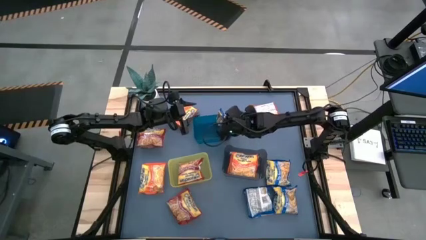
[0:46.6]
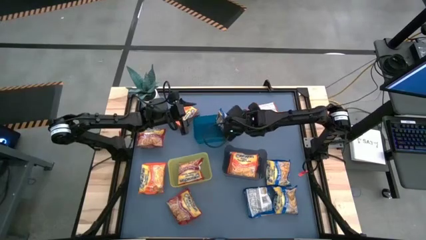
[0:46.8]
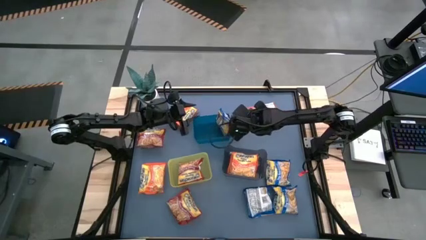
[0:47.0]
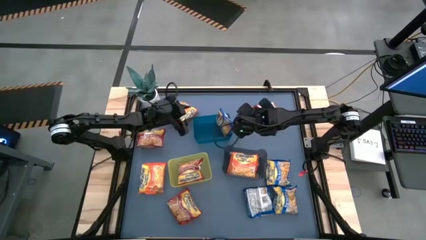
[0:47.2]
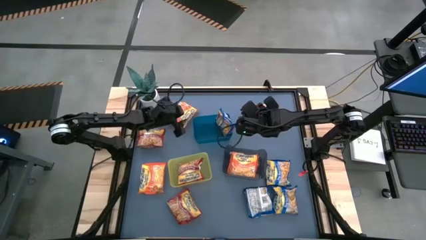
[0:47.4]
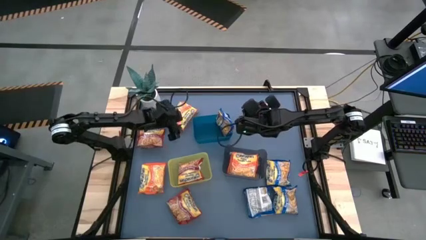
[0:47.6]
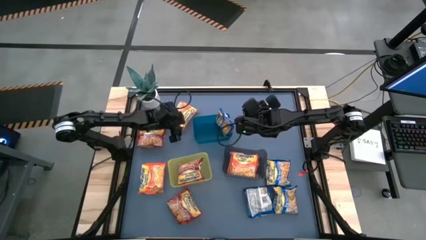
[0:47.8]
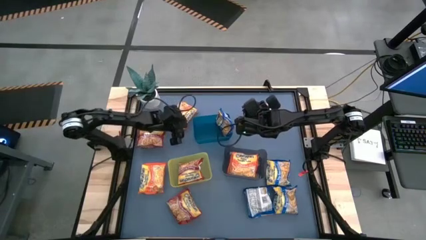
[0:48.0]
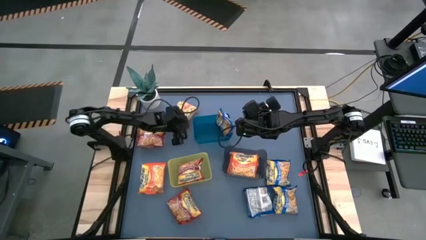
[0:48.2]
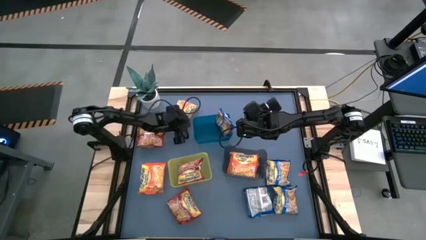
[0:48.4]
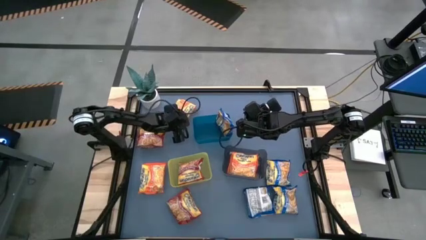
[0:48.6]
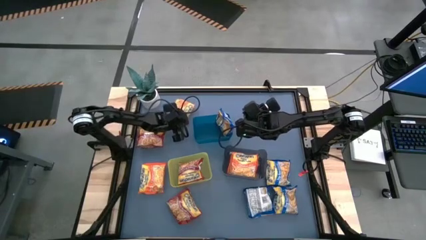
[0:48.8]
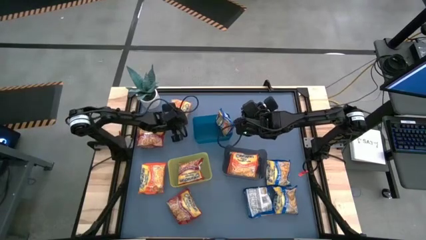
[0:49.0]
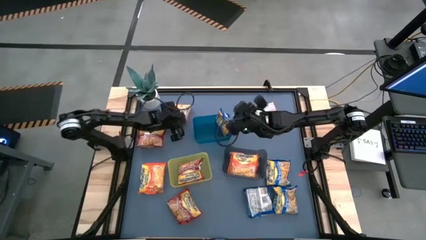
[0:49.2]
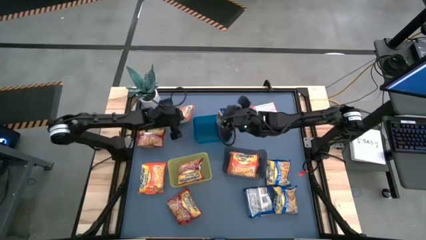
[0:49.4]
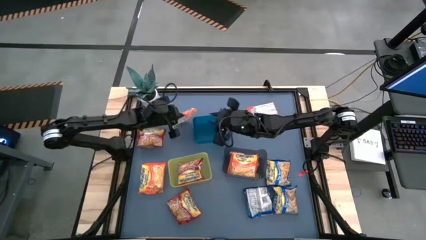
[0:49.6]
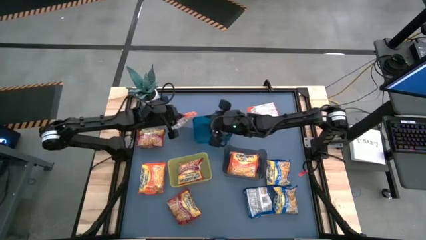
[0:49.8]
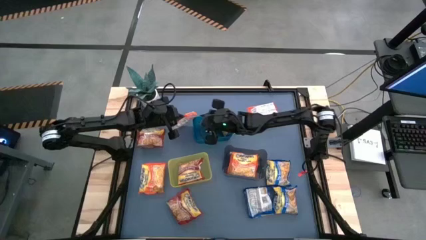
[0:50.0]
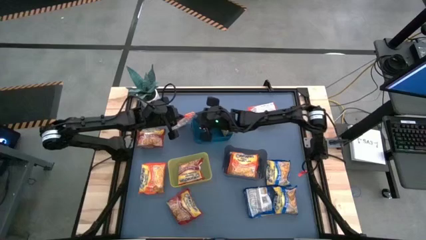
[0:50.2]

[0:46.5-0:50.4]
Task: Sort Maruchan noodles
Put the orange noodle pack into the black bin

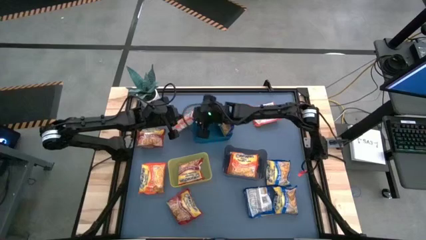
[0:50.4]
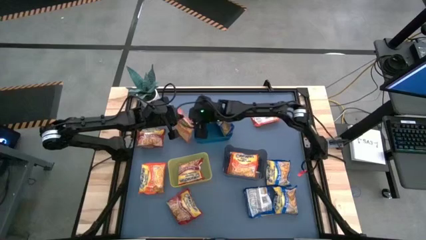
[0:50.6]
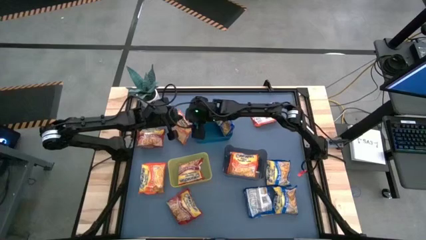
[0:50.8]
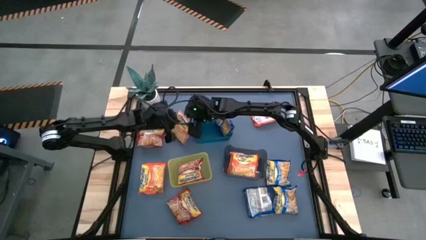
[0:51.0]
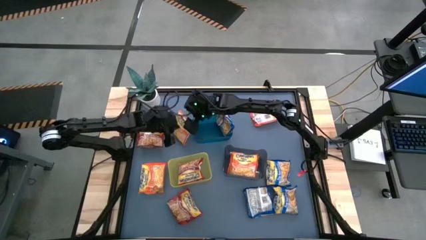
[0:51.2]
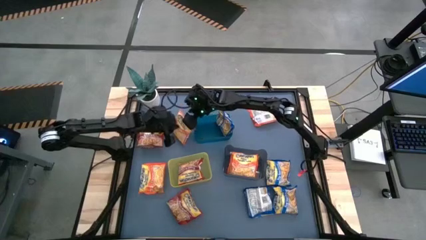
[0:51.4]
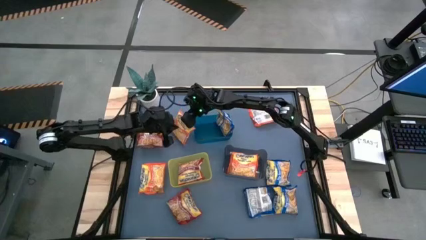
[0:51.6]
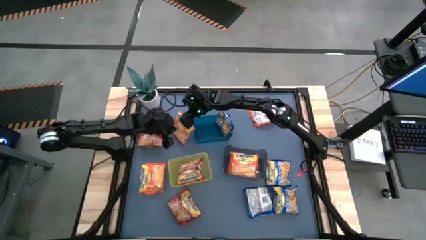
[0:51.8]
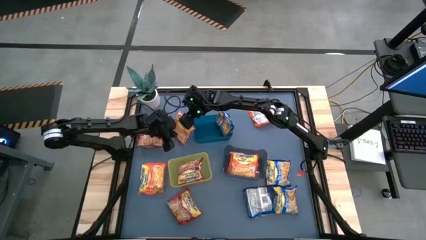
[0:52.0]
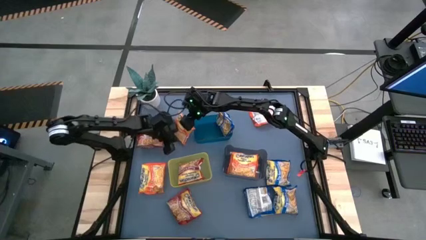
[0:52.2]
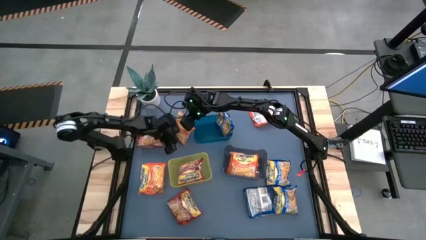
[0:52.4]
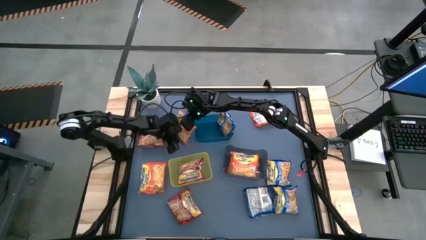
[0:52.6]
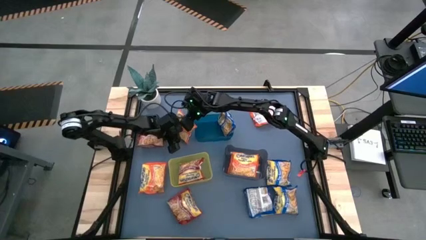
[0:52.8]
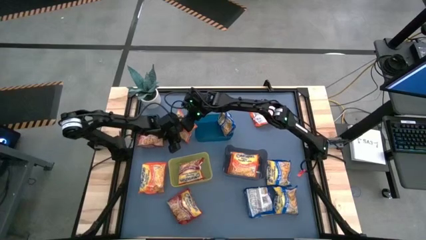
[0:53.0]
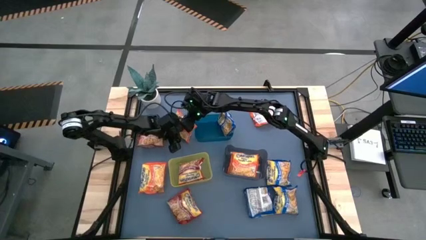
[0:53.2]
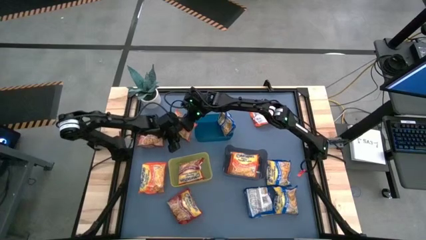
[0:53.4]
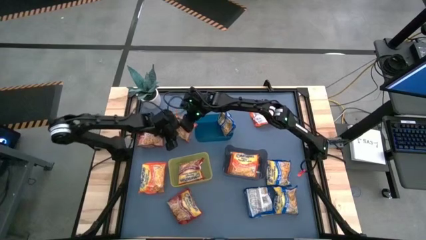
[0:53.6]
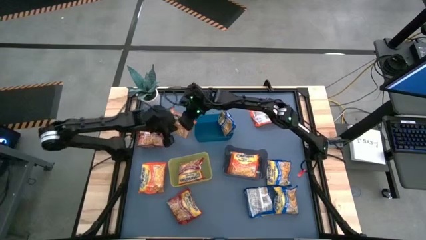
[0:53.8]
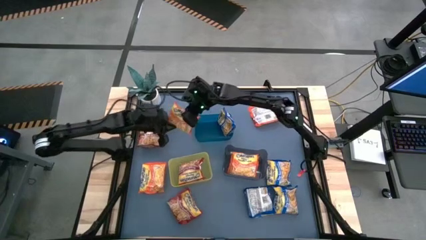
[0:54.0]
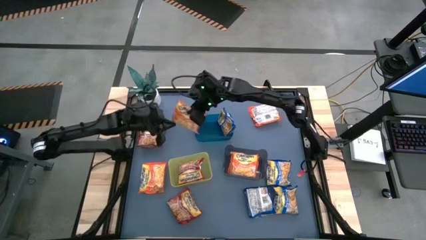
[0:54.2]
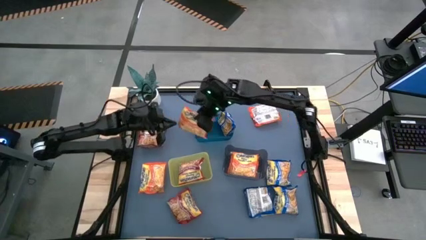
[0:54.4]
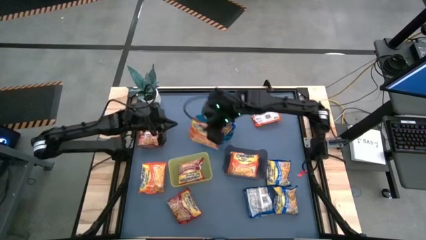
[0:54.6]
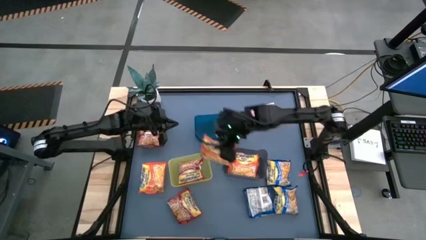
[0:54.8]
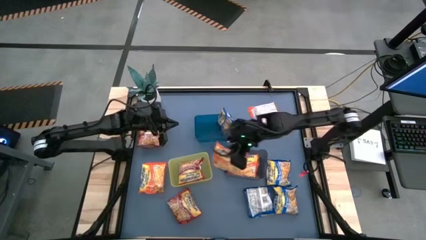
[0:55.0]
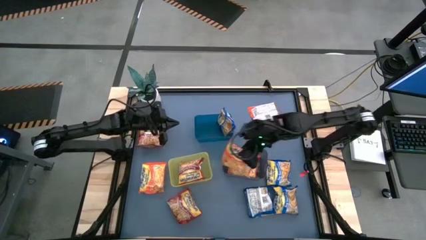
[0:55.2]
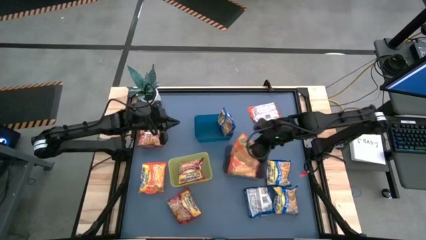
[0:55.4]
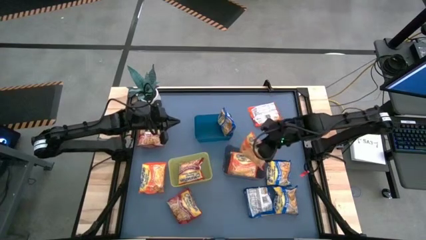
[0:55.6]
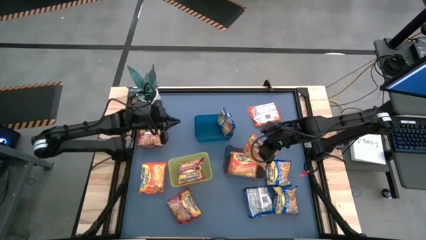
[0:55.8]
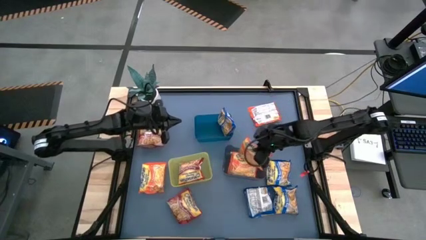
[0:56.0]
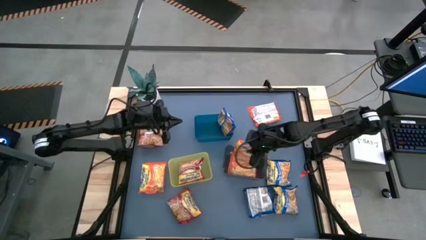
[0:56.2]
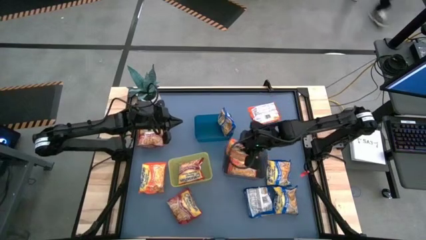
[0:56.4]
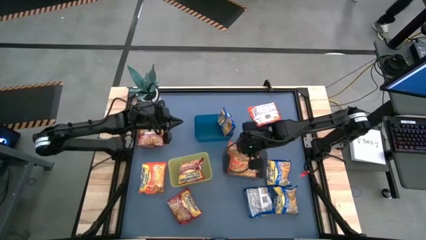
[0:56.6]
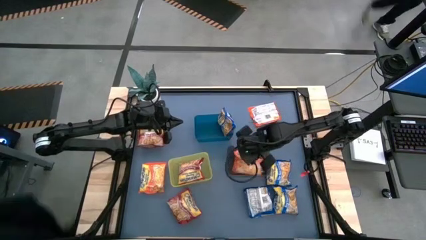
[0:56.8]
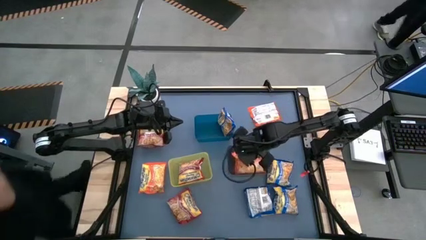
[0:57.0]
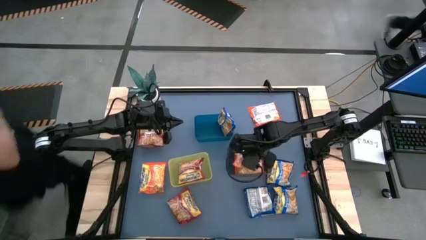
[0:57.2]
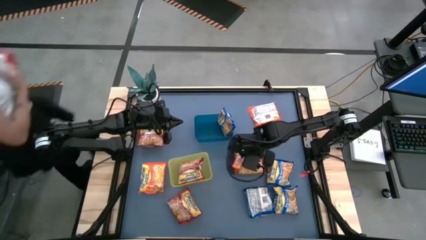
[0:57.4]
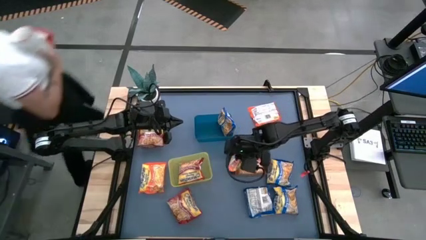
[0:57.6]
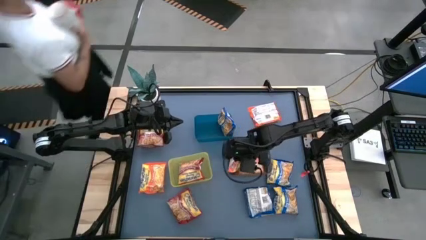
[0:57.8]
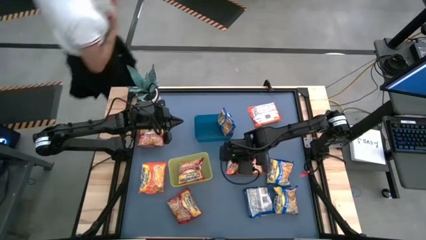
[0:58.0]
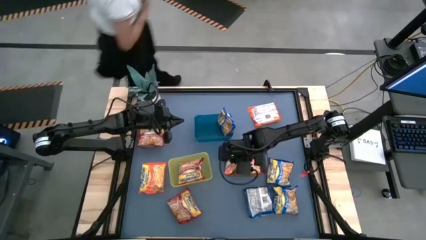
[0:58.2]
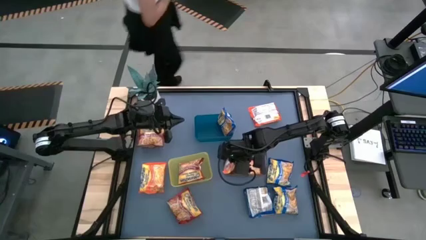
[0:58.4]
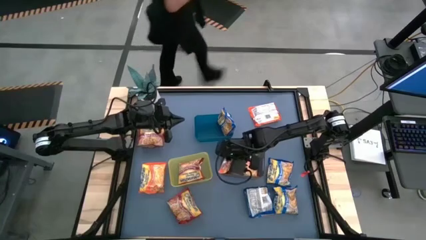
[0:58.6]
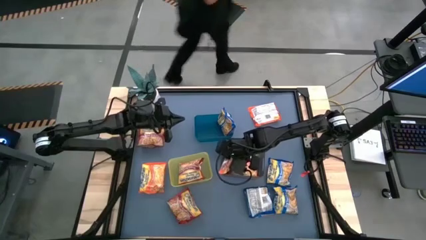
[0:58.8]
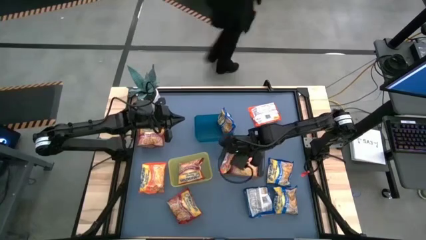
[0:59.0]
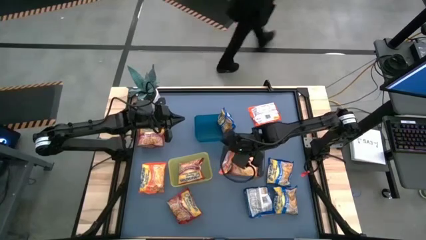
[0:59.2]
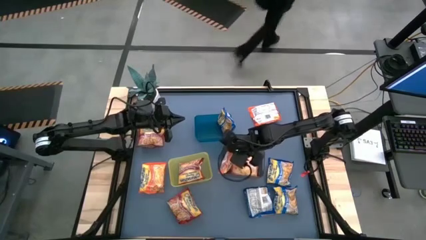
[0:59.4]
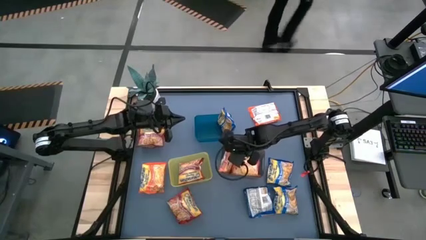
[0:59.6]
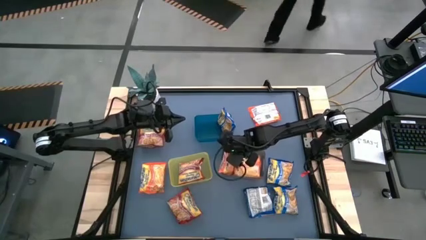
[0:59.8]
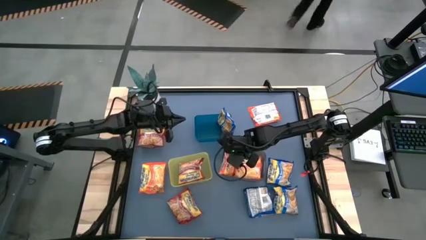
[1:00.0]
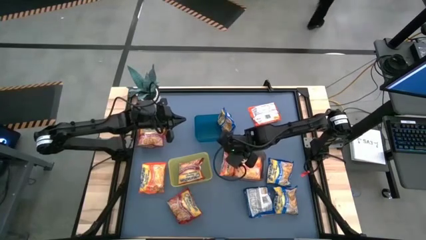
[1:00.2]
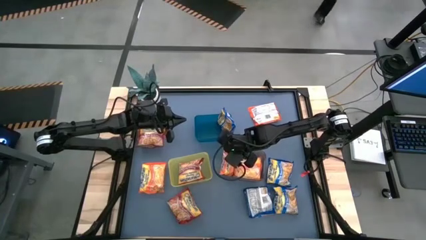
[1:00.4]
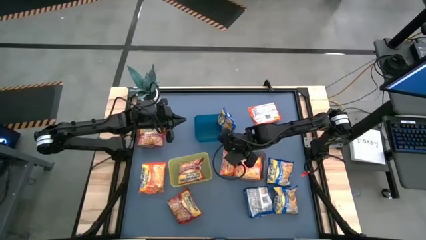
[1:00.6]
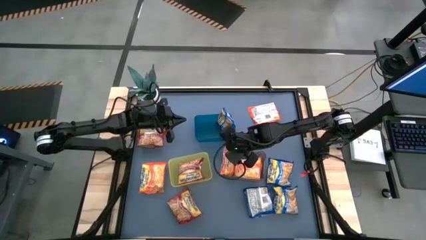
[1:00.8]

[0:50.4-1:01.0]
Put the orange noodle pack into the black bin
